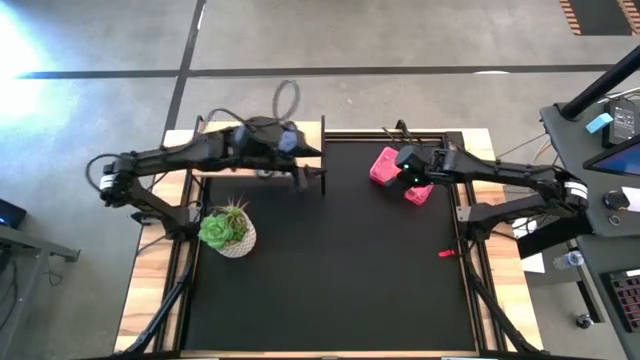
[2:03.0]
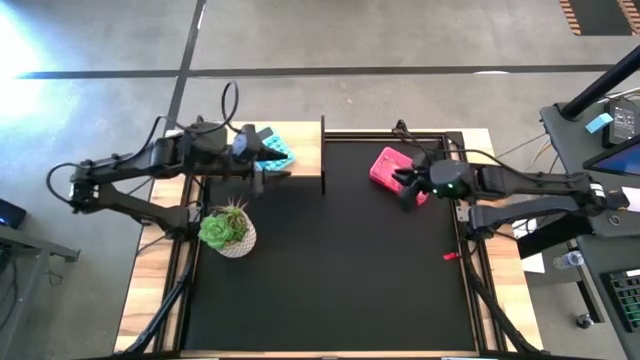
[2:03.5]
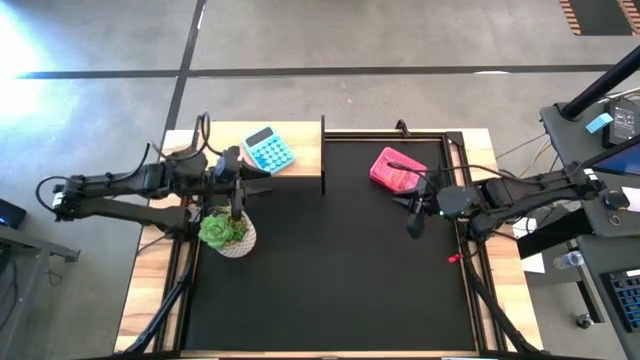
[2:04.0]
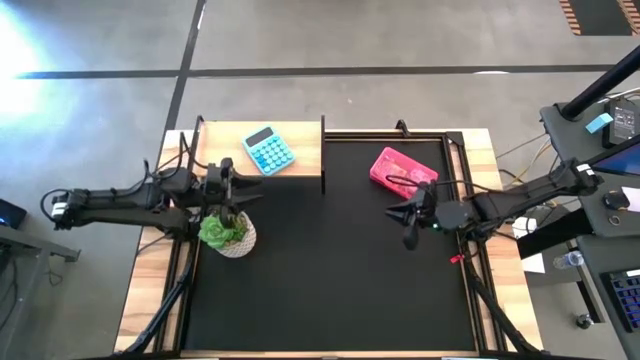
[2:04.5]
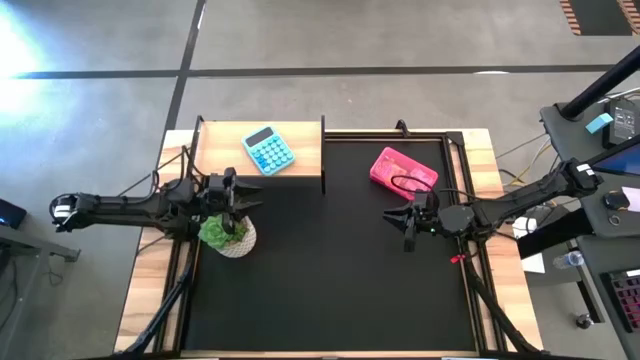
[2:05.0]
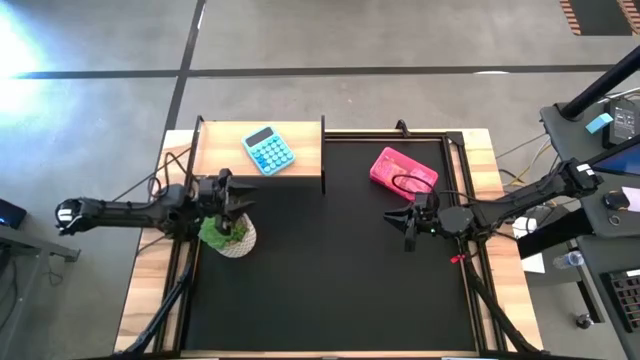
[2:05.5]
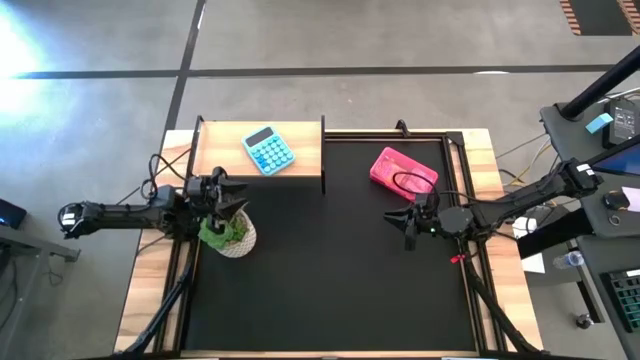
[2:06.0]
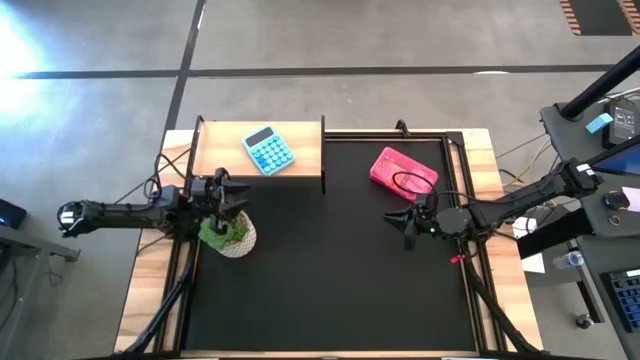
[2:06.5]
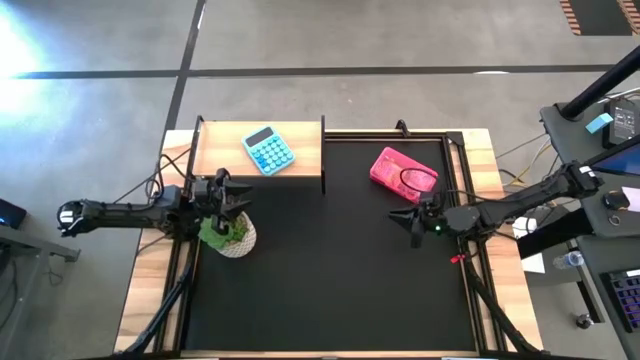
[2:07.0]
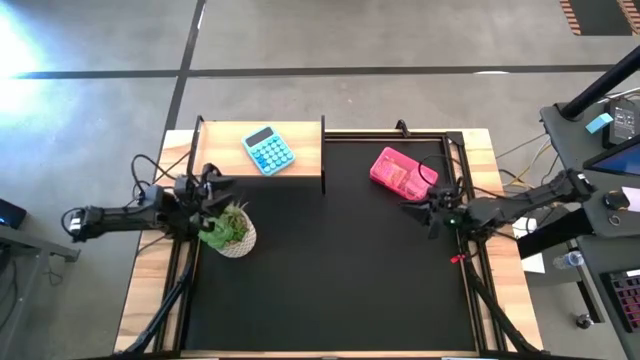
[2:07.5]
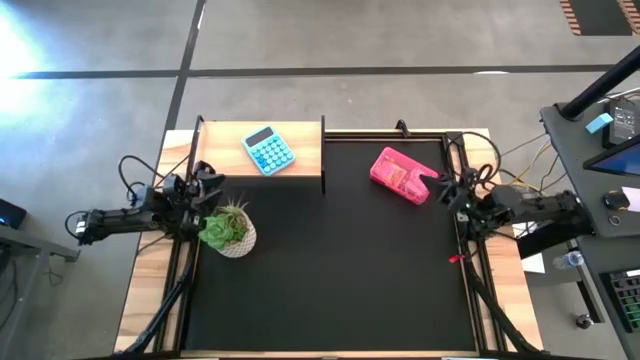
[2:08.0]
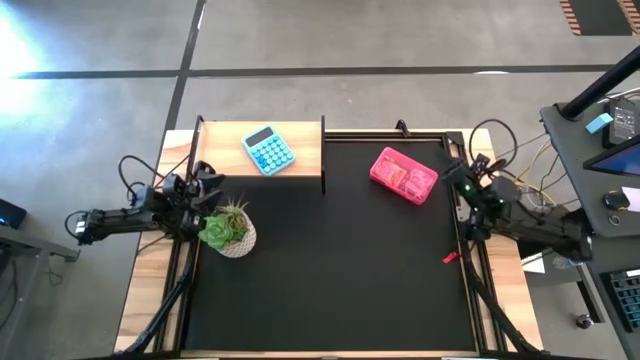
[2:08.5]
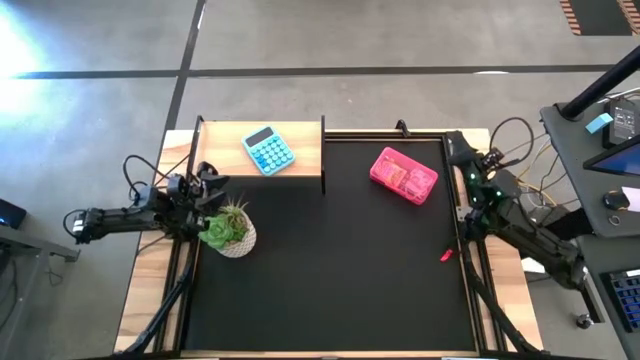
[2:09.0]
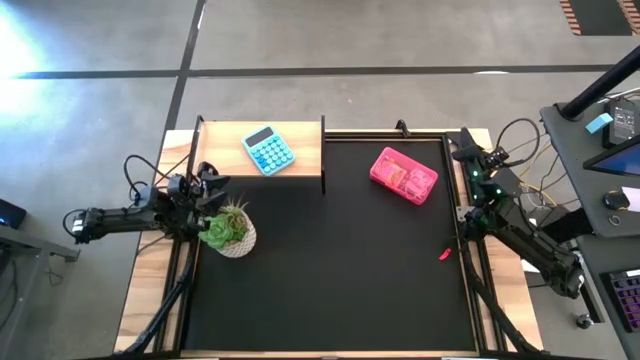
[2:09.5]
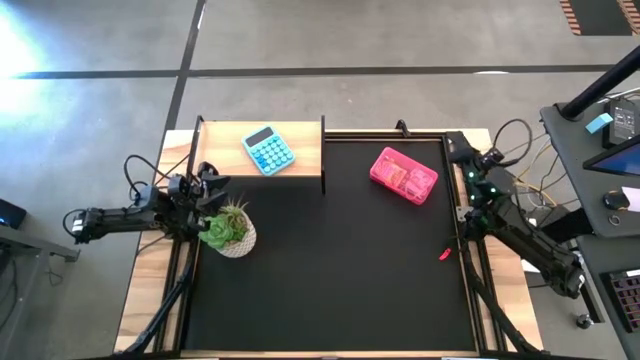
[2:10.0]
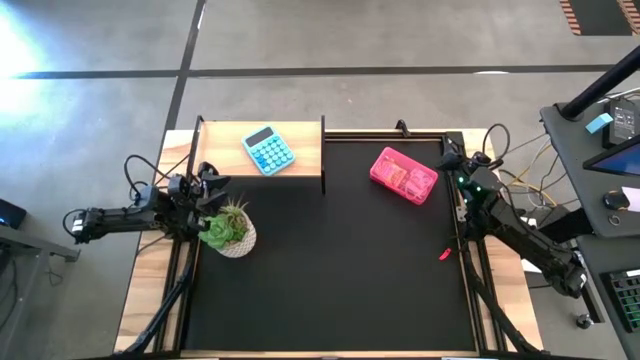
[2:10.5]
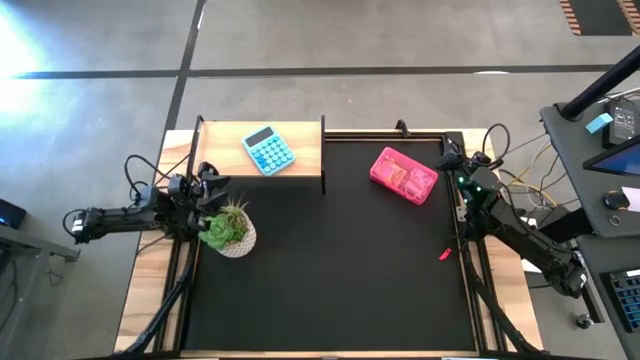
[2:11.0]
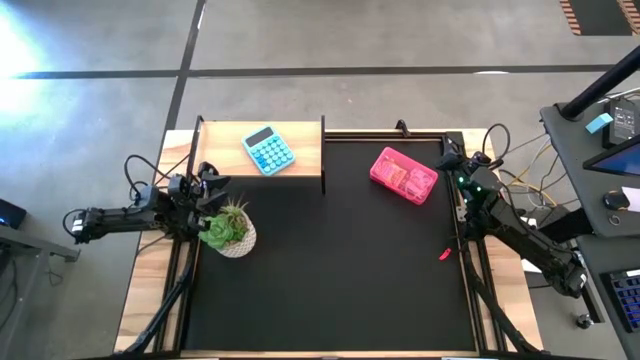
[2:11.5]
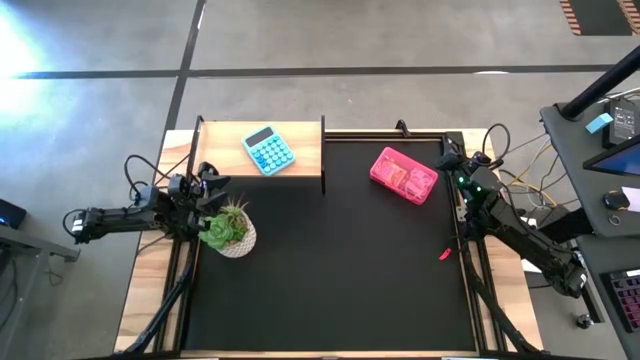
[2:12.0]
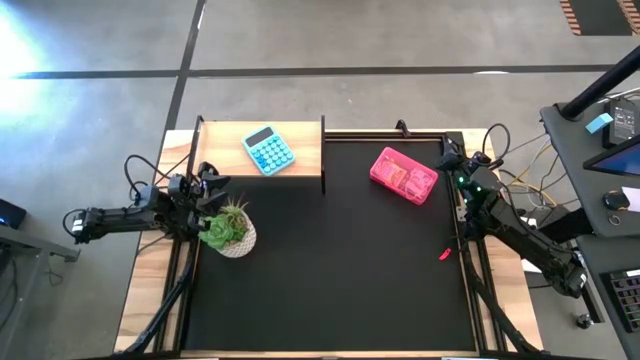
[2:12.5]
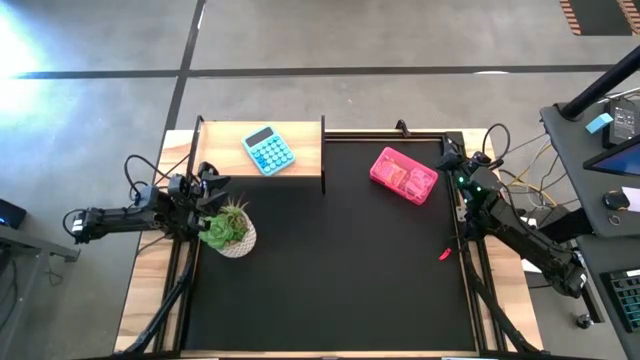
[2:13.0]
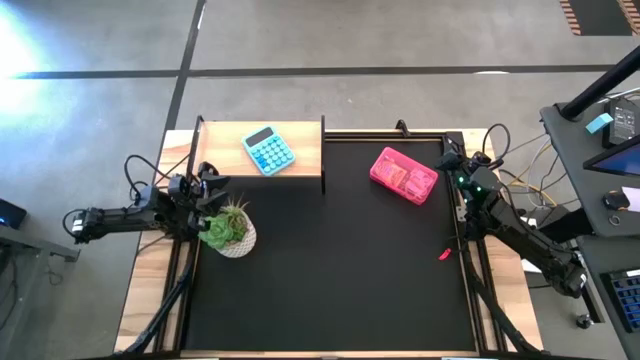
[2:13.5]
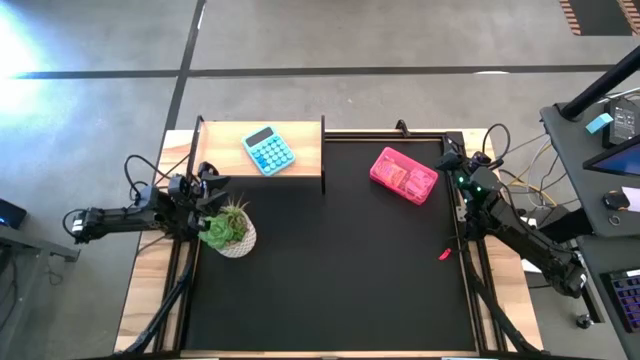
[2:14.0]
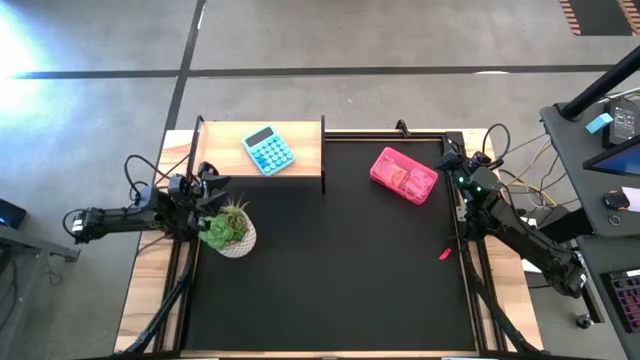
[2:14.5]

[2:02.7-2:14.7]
Task: Pack school essentials
Return to Home Position
